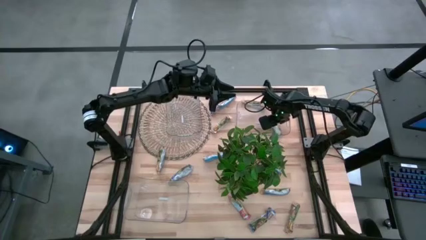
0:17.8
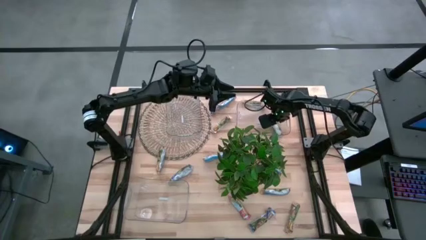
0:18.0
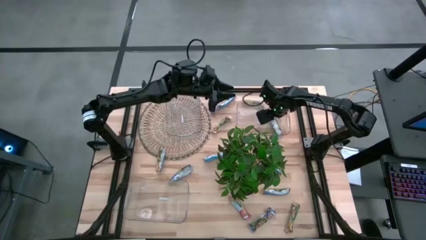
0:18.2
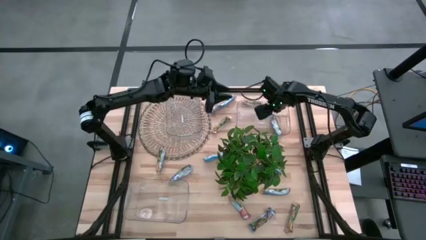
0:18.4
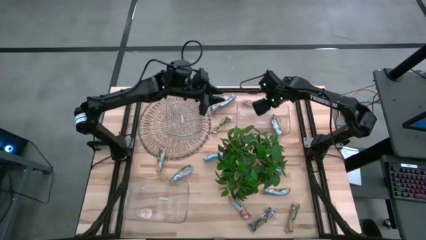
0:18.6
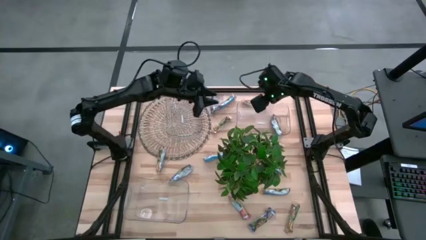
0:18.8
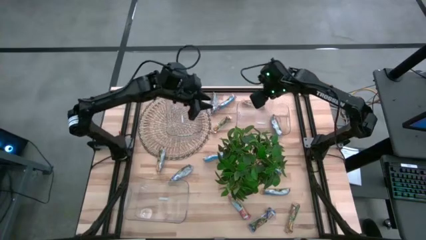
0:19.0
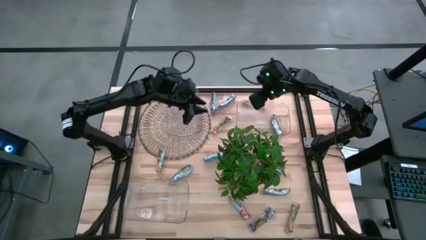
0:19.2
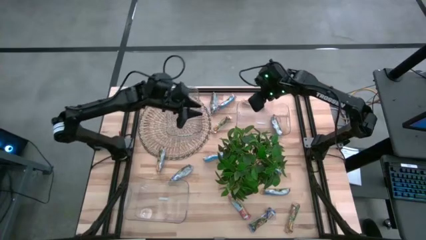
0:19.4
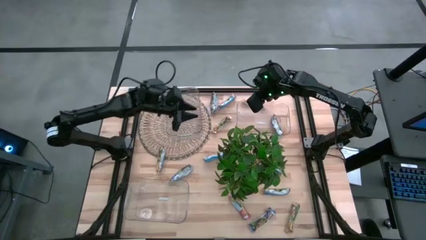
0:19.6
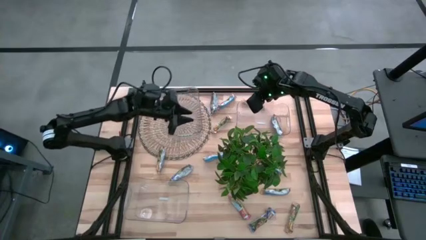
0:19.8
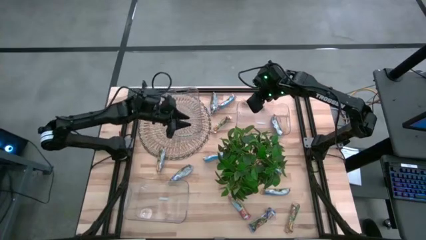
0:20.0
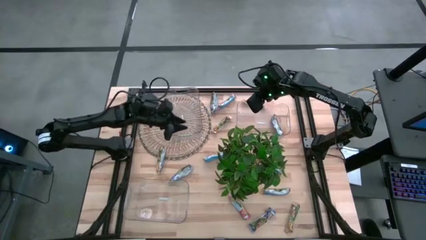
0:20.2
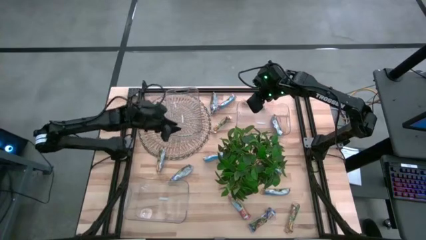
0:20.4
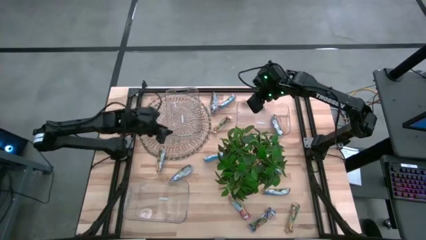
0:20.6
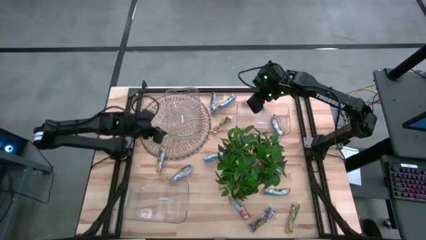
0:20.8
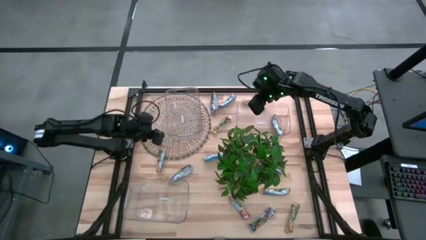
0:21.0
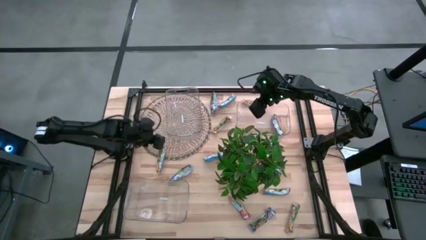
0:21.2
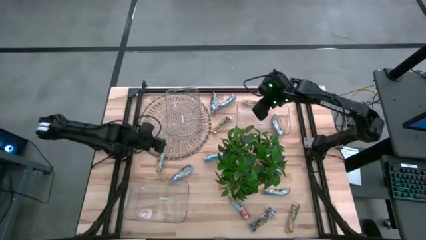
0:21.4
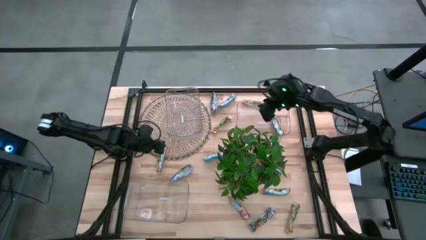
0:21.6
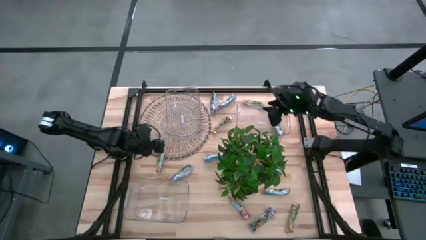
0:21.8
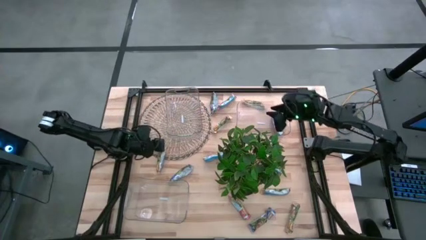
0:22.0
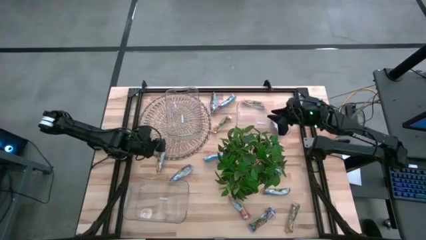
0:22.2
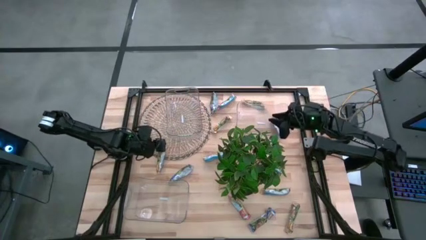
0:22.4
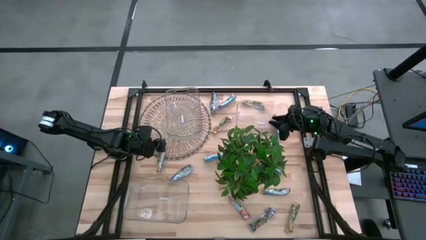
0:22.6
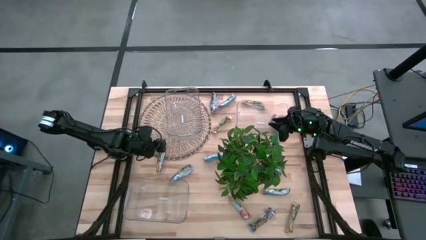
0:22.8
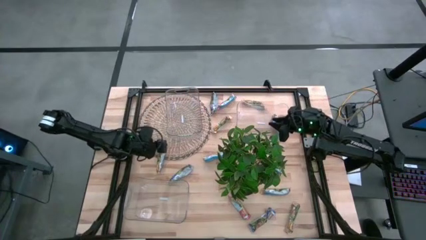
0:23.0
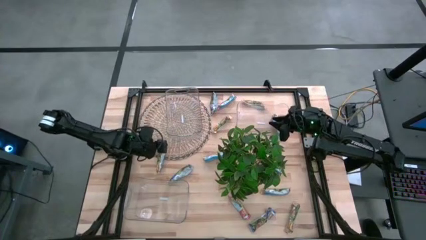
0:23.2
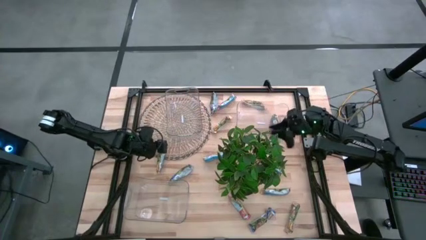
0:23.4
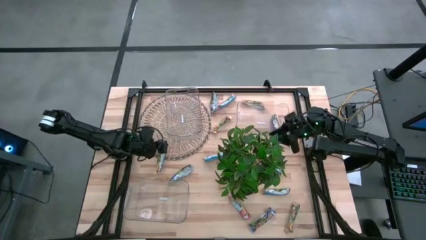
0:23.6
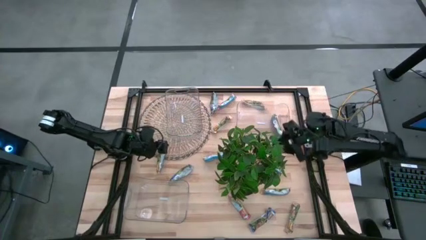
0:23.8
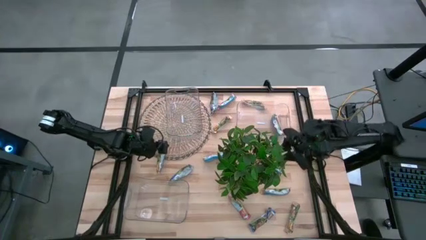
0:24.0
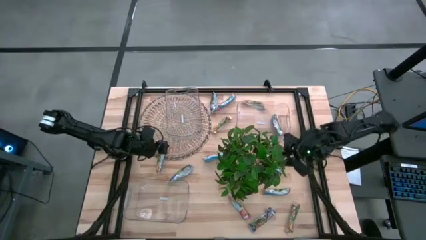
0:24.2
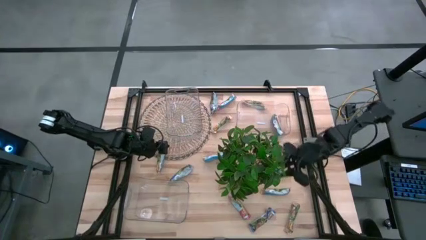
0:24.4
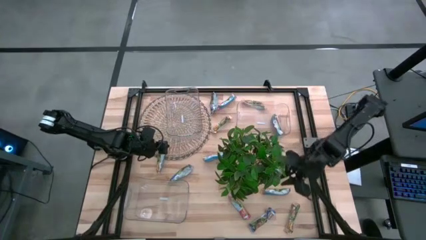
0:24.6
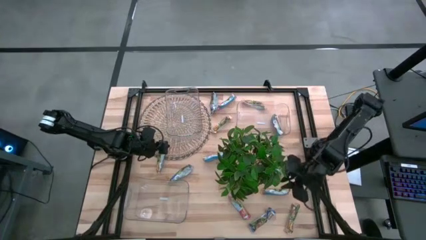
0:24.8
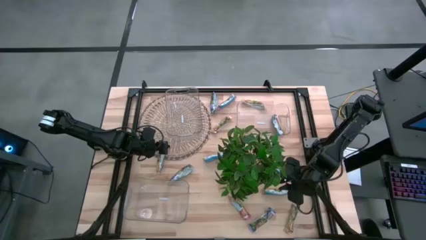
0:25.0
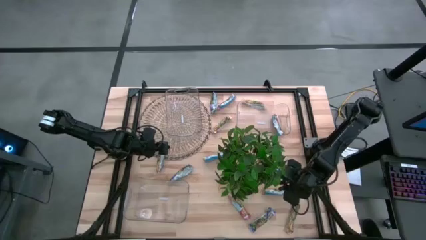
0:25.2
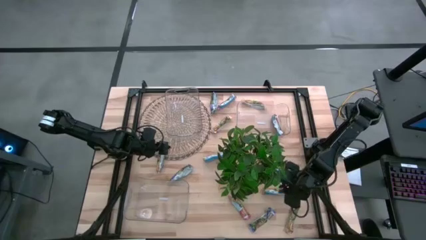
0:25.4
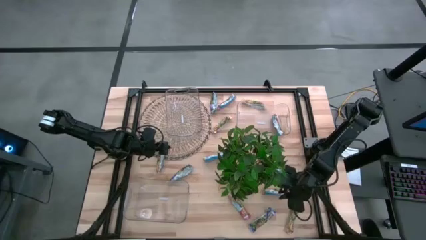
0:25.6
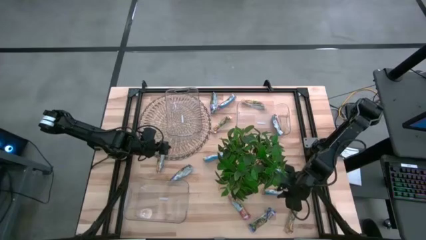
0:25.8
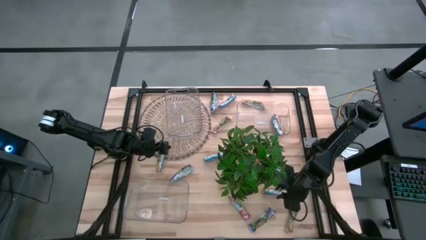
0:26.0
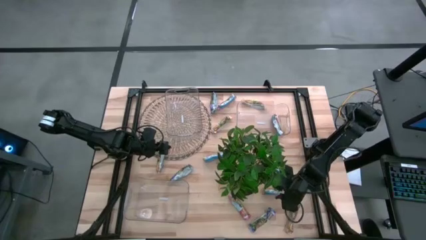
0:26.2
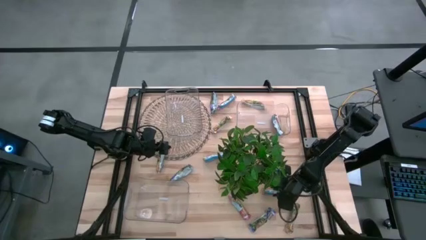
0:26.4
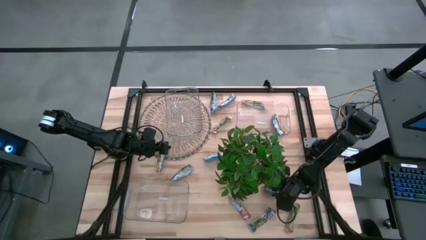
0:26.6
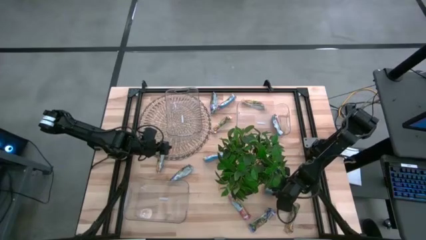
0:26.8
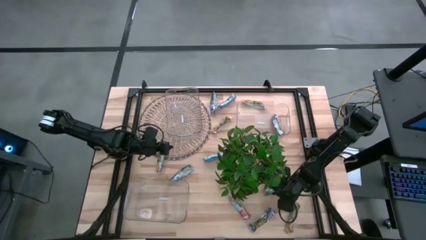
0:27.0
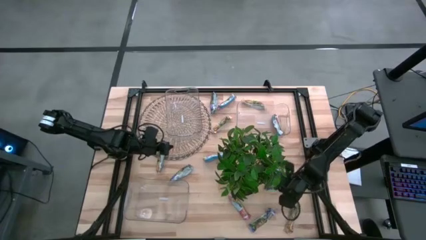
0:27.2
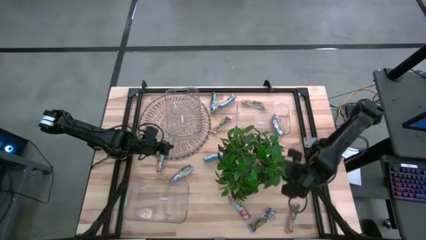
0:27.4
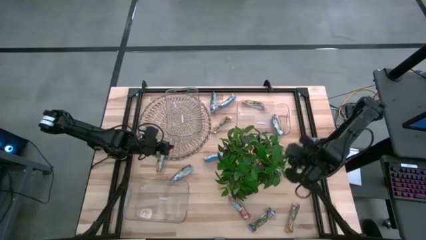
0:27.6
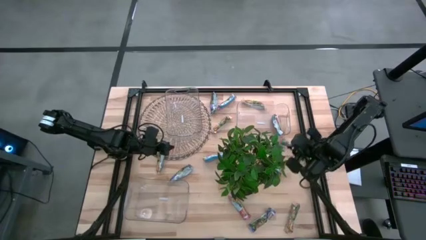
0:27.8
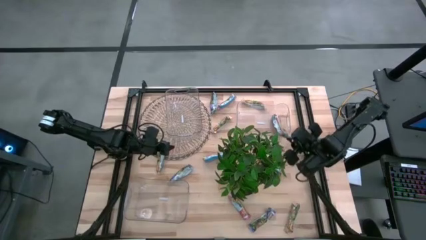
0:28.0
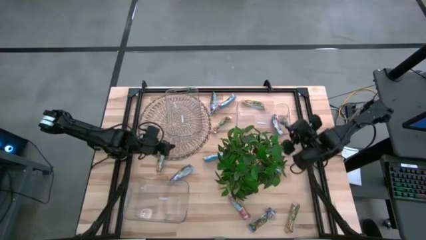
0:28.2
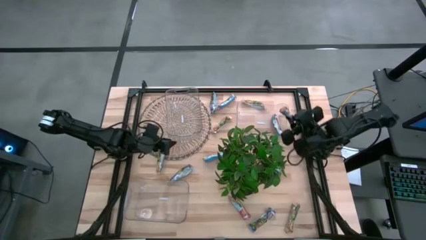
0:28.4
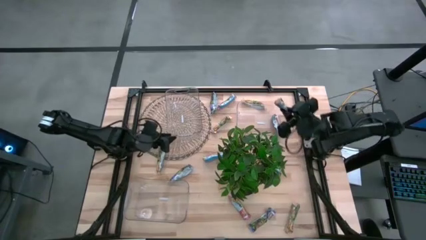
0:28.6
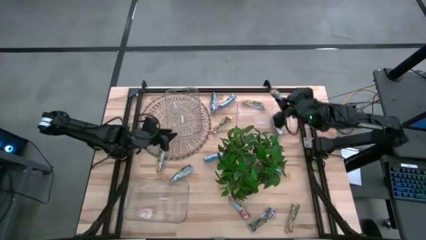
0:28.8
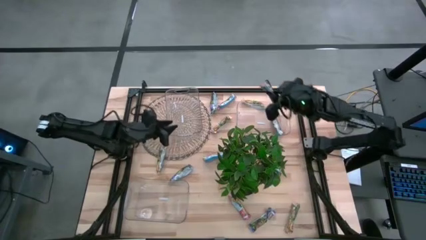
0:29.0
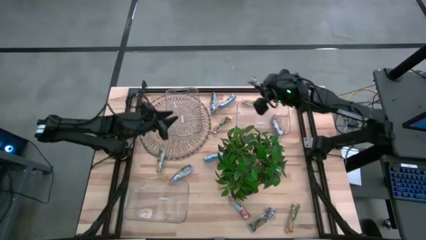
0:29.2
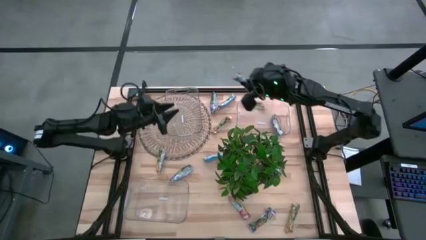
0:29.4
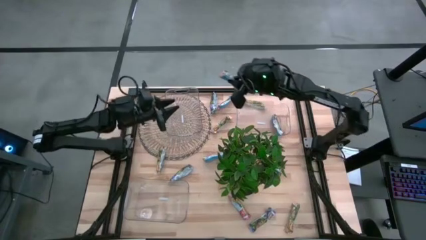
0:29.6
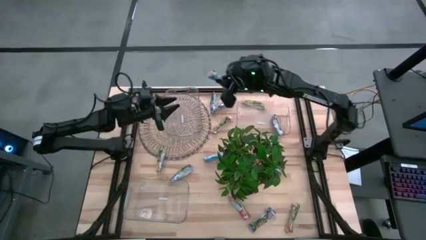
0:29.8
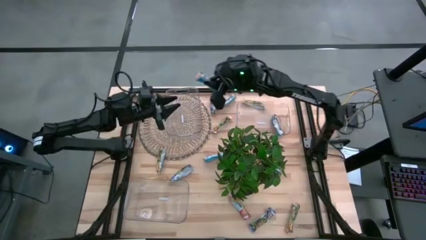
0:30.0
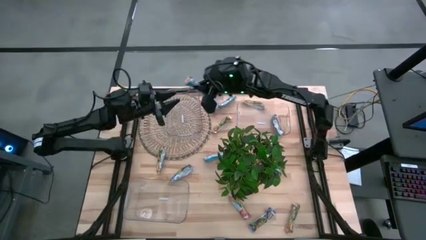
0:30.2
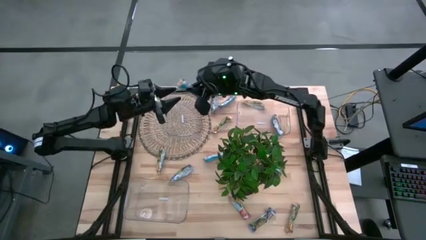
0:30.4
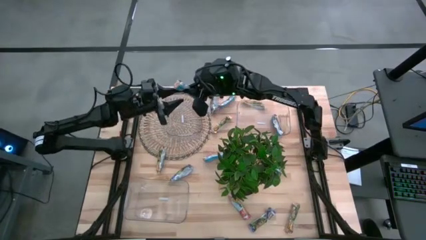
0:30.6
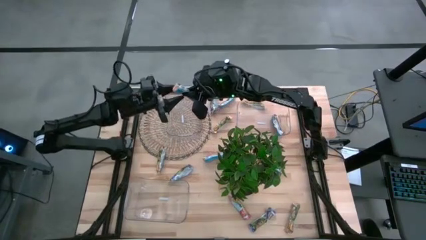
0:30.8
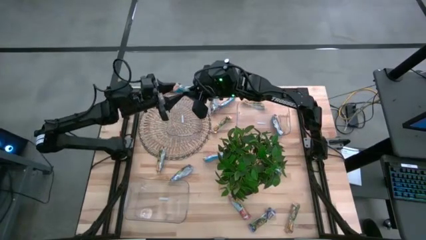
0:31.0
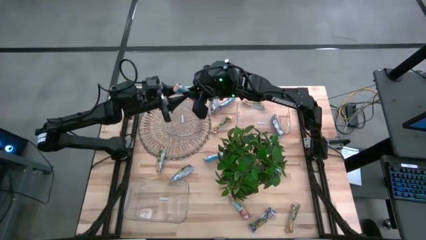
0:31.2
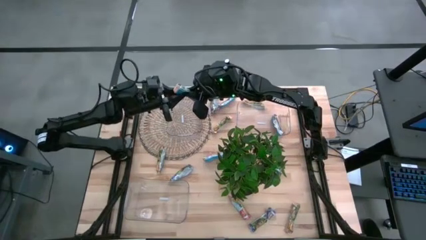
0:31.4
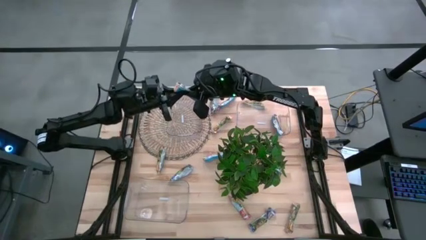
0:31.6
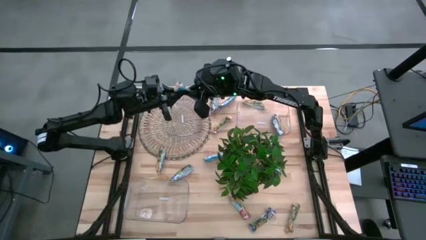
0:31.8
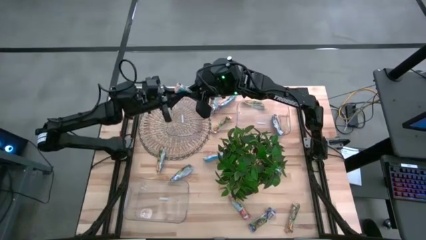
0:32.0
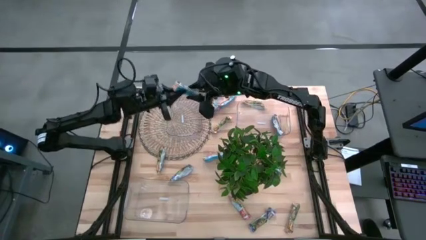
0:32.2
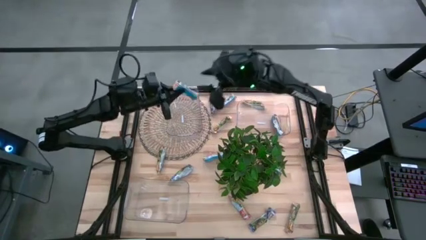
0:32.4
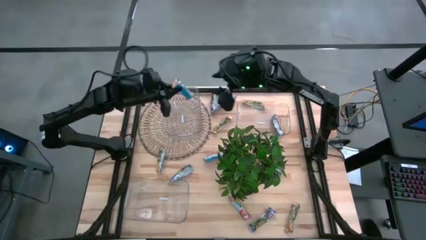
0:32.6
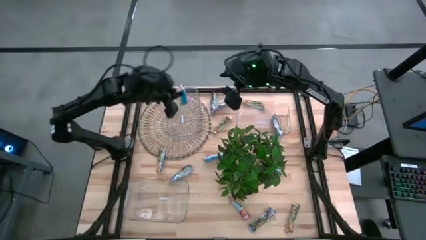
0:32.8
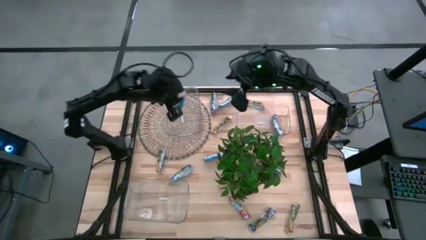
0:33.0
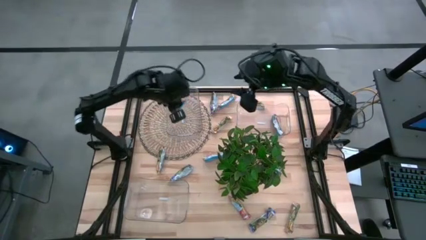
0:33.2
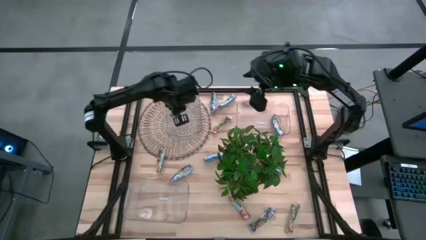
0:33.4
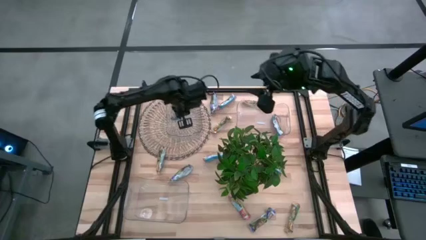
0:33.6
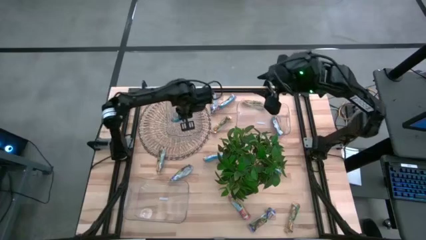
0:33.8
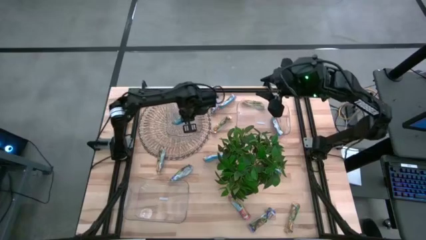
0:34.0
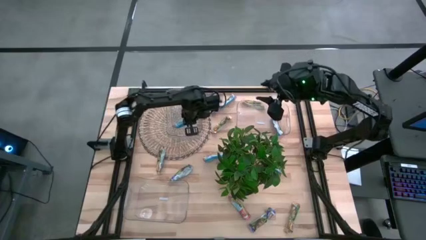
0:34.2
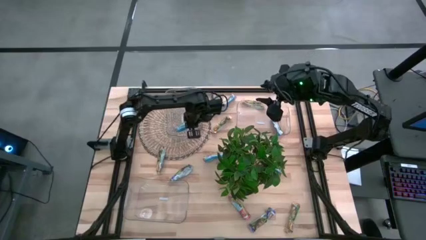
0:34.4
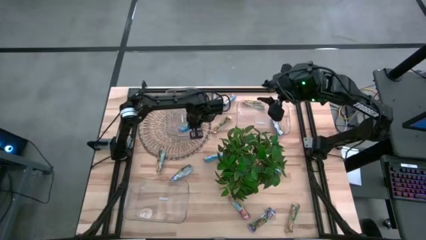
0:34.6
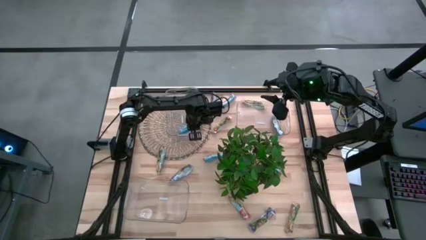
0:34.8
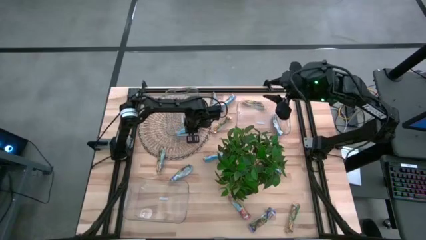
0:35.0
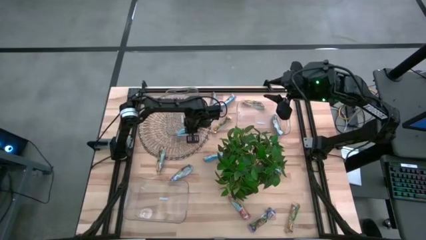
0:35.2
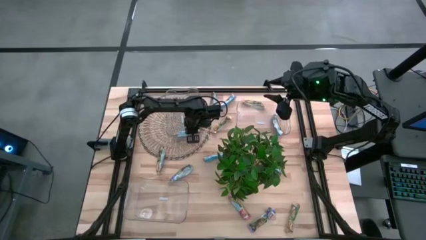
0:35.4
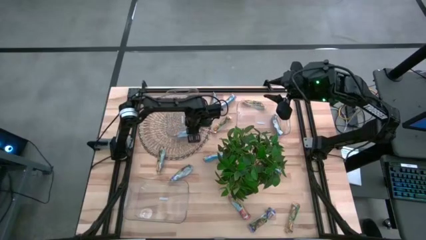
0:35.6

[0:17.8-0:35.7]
Task: Pick and place Granola Bars by type
Put the middle right yellow granola bar into the top left transparent bin
